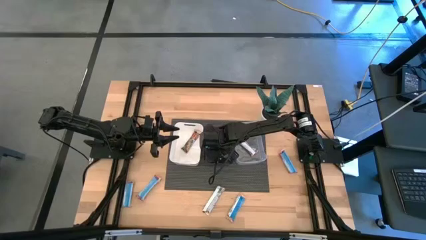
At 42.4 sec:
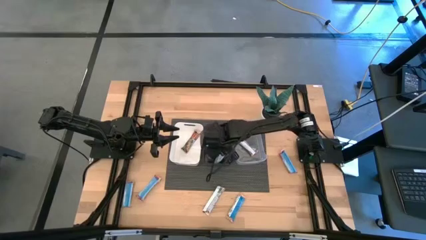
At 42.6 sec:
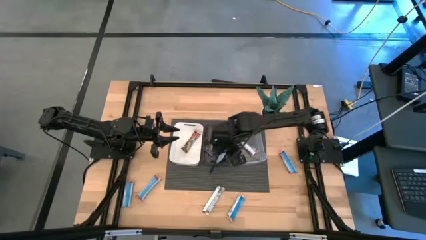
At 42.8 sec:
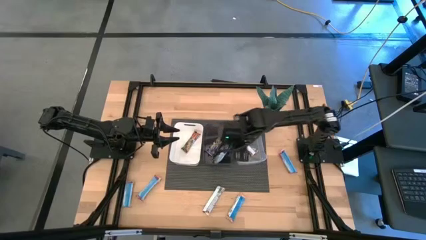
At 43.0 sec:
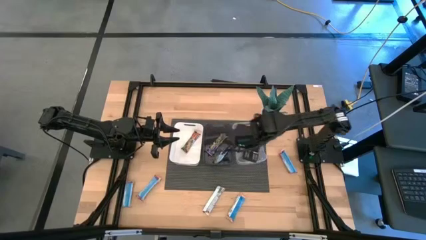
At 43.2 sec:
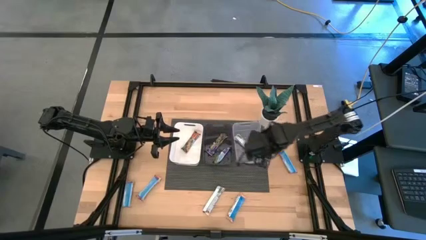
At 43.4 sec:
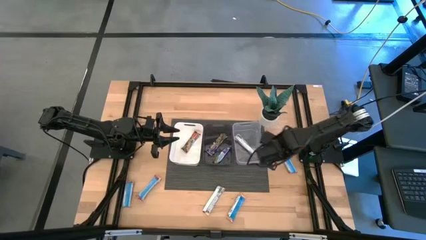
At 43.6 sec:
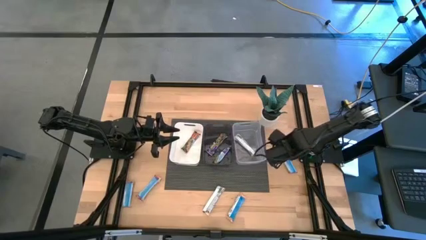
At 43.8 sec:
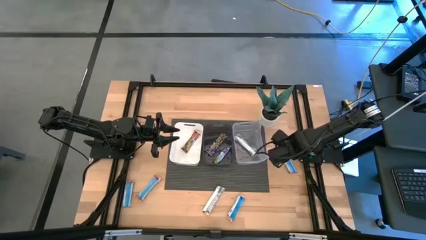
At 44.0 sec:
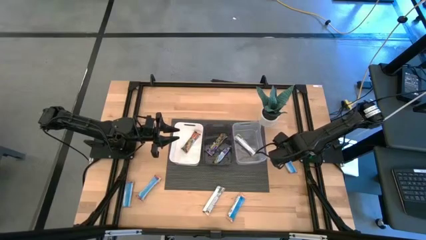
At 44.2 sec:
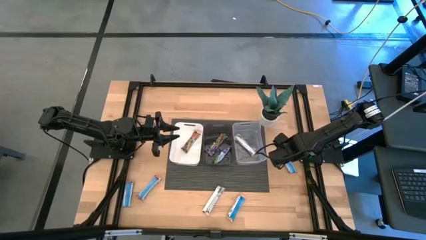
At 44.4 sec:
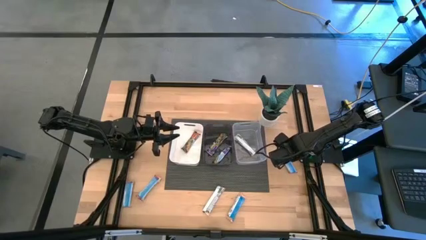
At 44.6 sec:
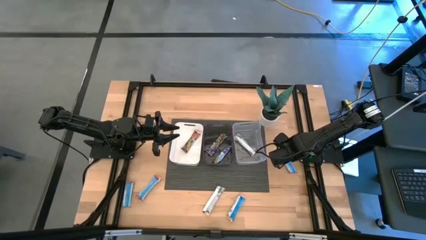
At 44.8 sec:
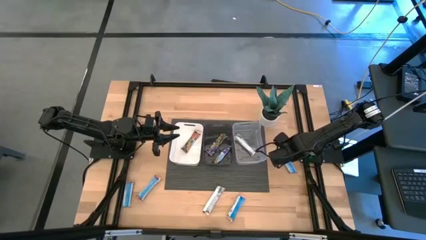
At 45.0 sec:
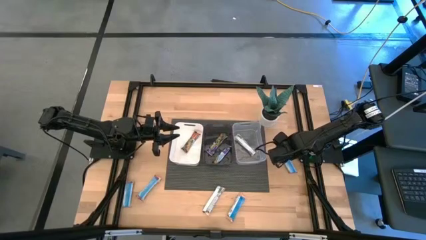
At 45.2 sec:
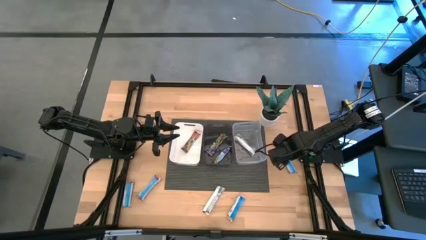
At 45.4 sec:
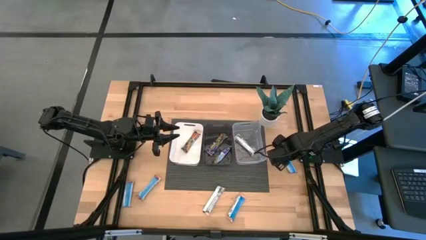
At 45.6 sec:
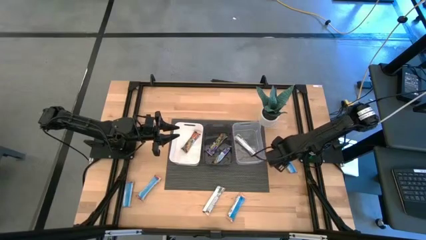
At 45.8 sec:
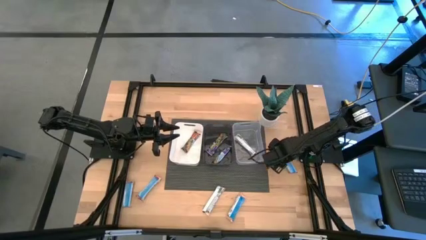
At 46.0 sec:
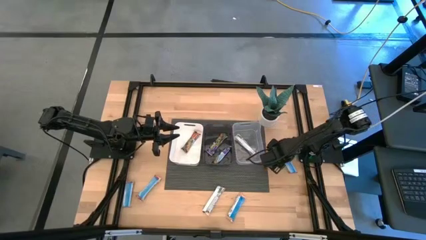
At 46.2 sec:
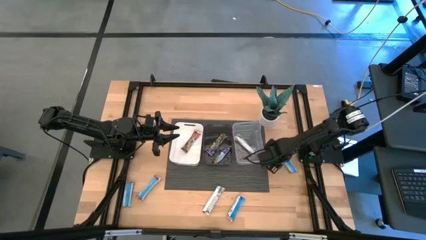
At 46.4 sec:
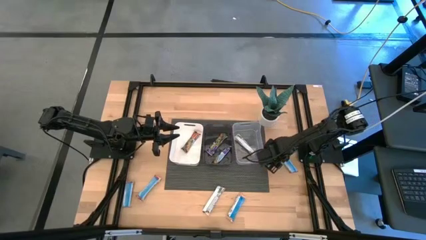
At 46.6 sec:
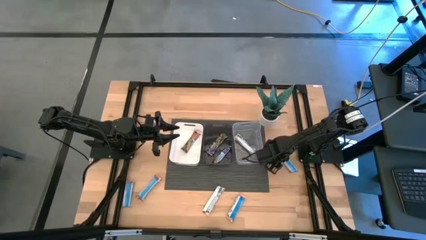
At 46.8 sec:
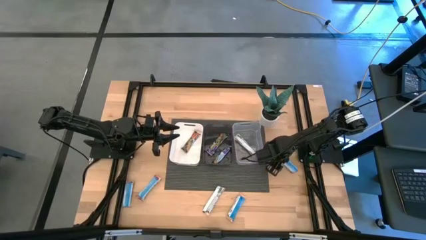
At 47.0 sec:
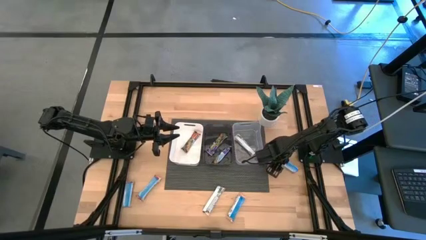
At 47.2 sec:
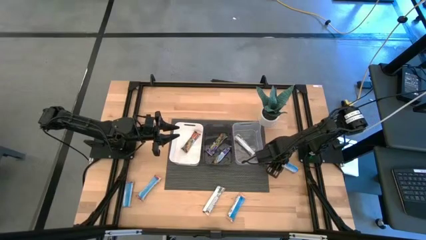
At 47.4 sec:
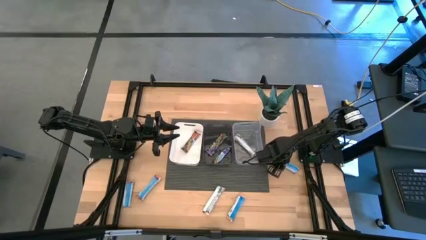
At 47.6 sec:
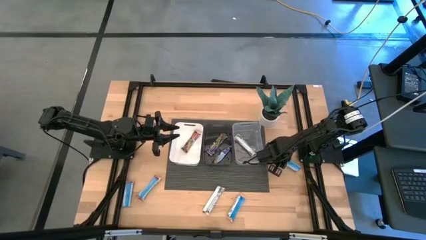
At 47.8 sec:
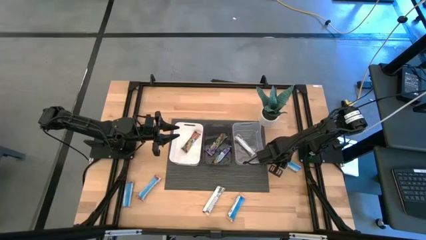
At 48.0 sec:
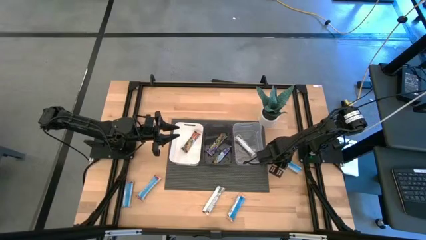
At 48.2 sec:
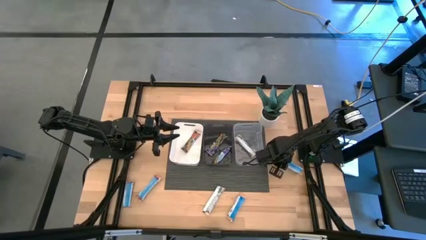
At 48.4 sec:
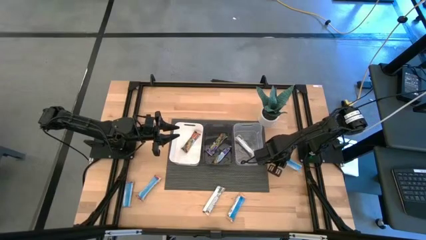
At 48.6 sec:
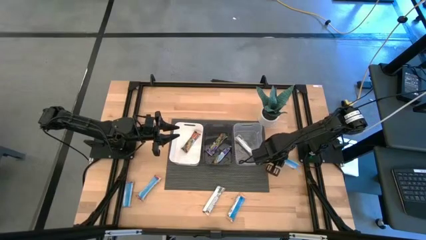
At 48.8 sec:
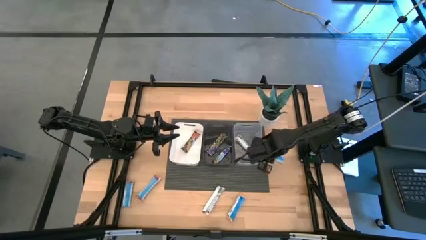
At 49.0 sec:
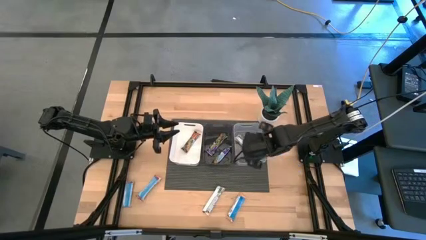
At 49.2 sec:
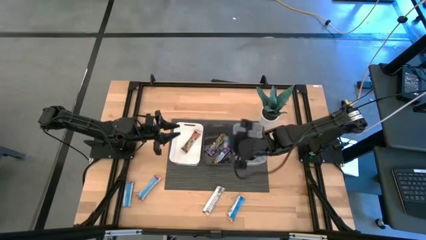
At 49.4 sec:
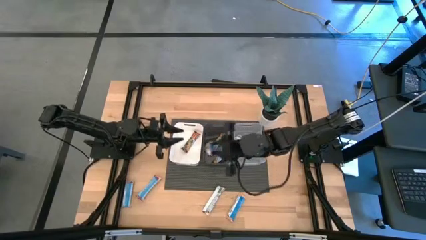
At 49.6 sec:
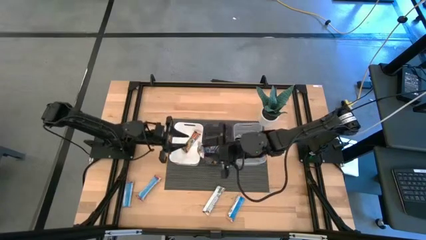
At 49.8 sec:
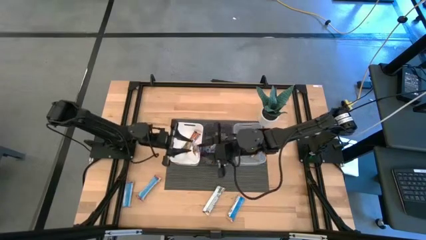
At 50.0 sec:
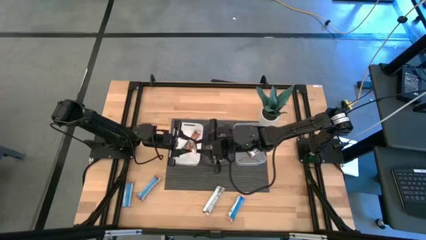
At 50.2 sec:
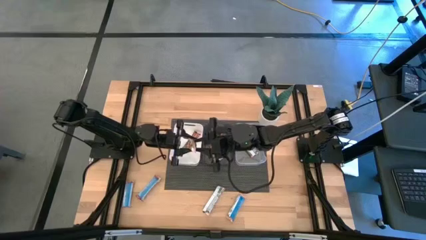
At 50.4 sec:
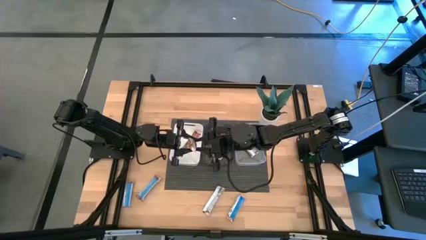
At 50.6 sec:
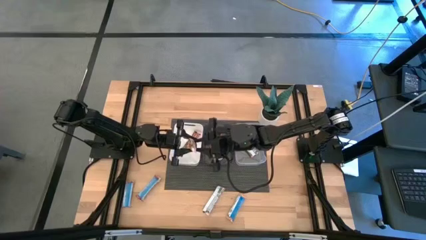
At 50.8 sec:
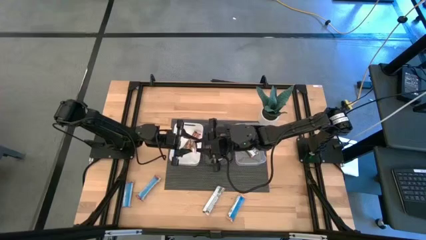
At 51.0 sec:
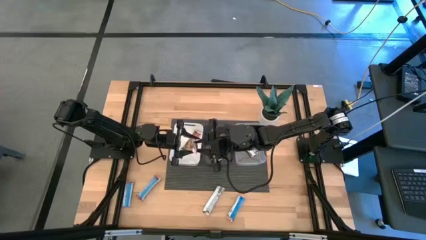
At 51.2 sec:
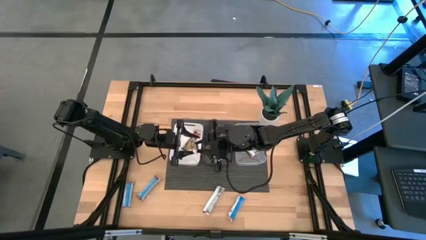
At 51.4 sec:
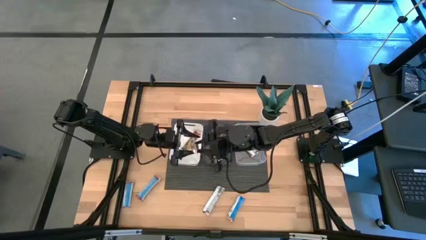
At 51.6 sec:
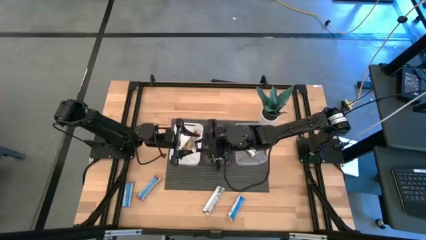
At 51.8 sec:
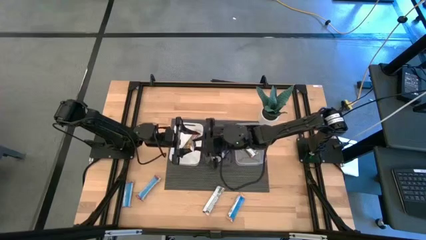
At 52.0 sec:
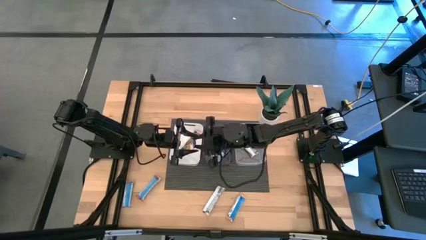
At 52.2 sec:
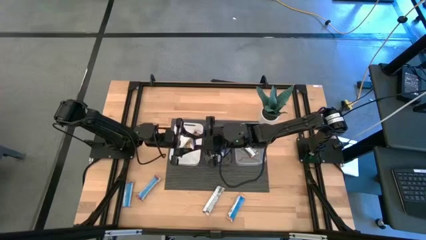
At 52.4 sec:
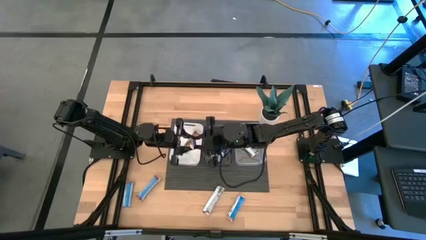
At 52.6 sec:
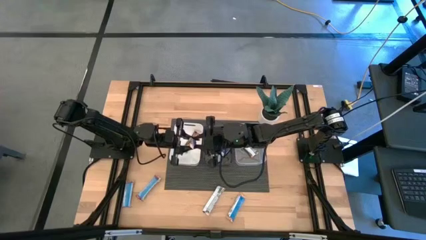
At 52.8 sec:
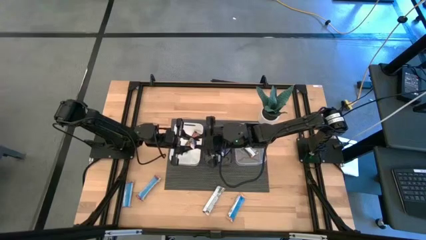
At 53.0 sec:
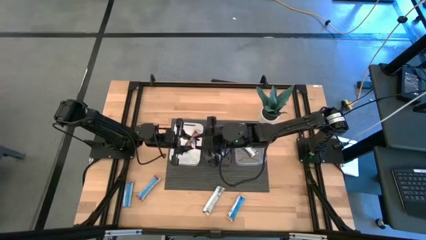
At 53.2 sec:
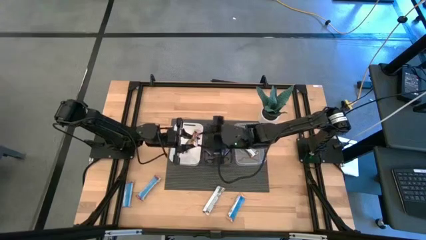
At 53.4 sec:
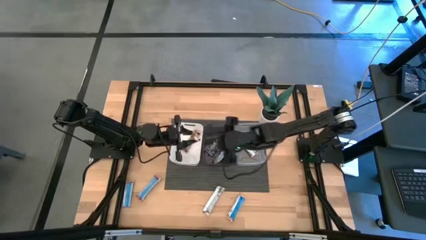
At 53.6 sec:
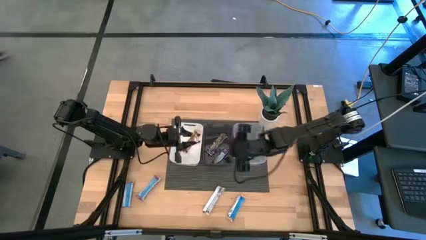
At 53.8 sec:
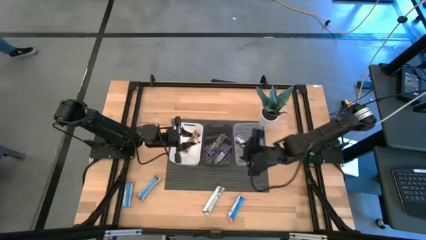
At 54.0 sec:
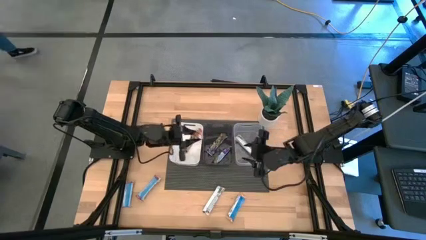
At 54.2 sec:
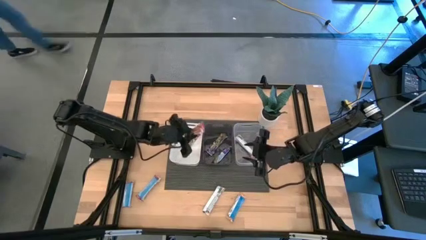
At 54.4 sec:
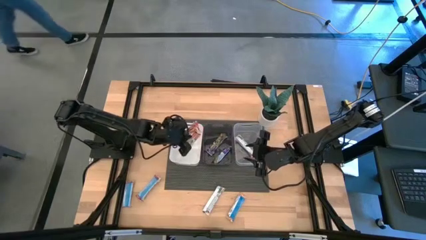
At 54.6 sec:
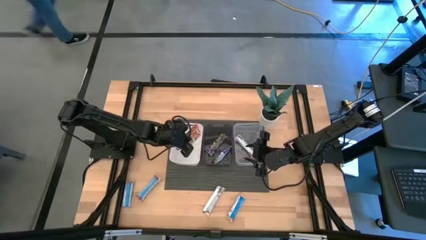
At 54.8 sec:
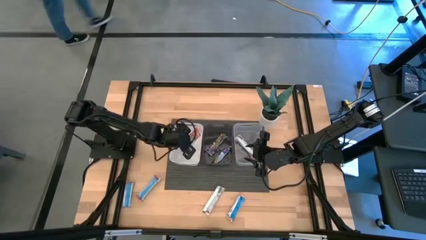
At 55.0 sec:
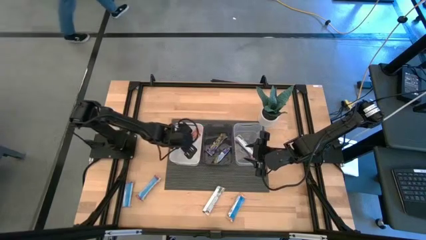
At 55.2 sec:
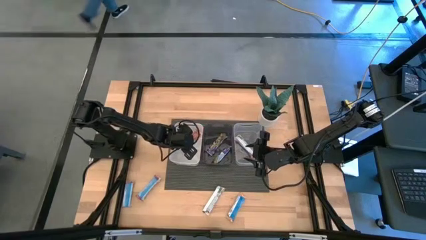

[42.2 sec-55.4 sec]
Task: Pick and place Granola Bars by type
Put the red granola bar into the white bin

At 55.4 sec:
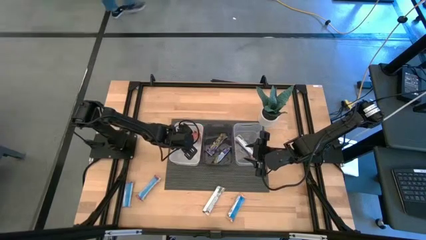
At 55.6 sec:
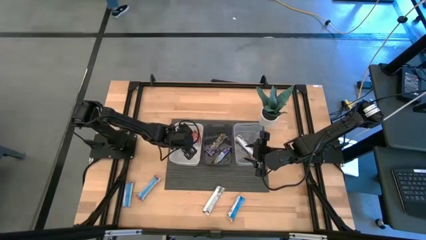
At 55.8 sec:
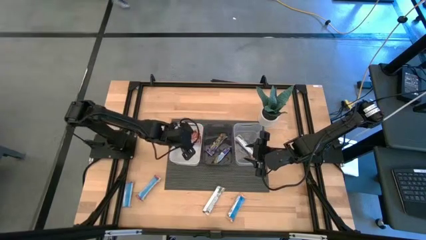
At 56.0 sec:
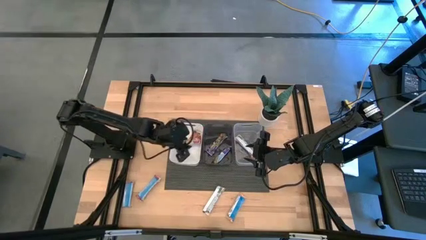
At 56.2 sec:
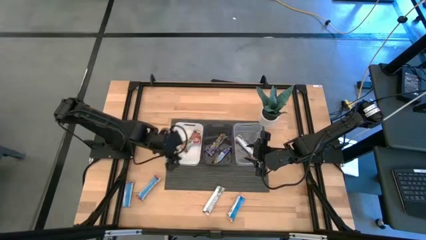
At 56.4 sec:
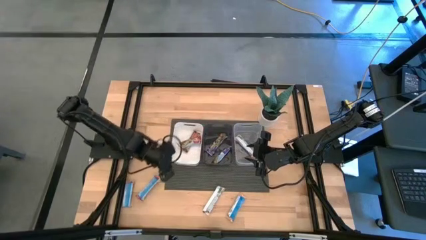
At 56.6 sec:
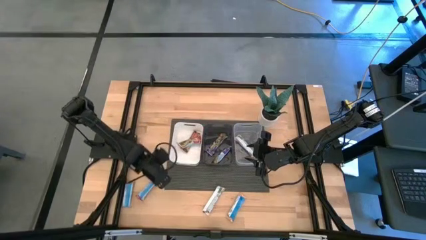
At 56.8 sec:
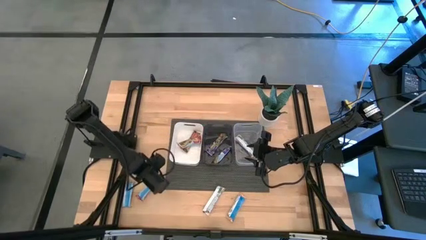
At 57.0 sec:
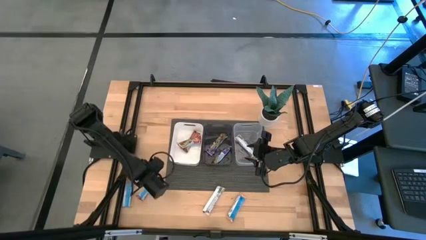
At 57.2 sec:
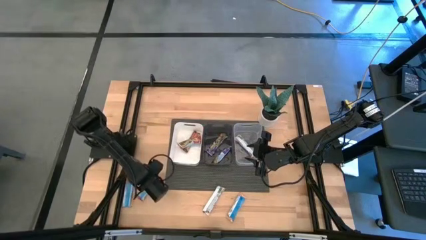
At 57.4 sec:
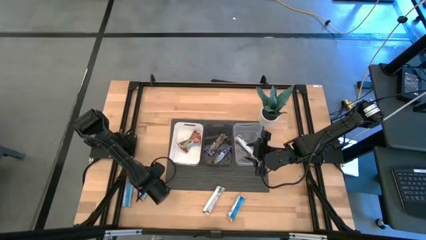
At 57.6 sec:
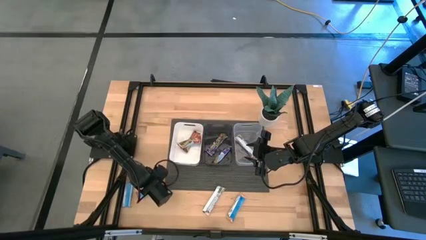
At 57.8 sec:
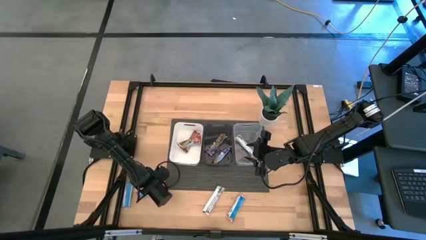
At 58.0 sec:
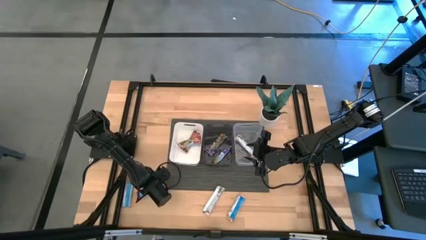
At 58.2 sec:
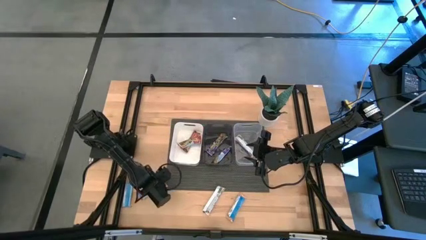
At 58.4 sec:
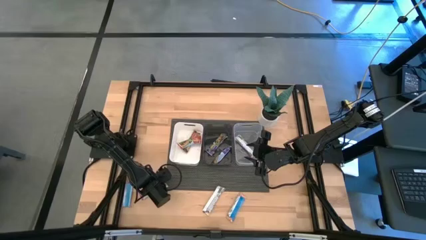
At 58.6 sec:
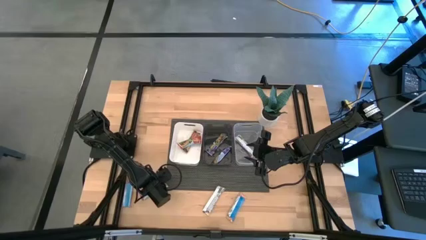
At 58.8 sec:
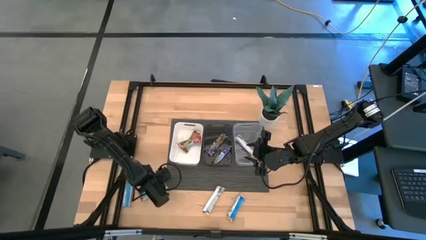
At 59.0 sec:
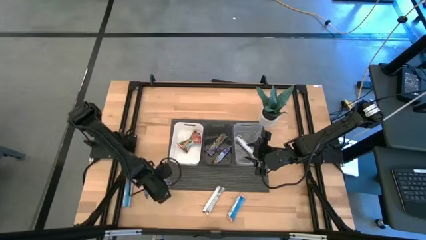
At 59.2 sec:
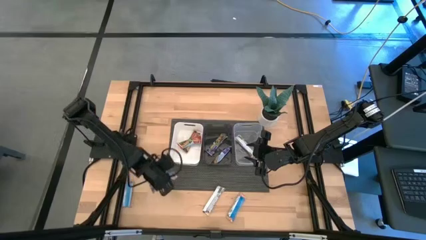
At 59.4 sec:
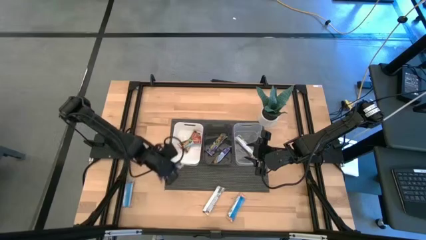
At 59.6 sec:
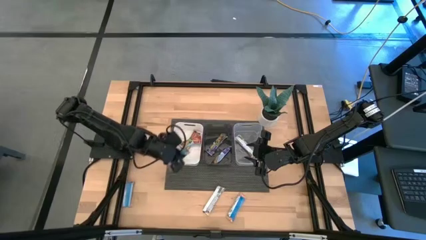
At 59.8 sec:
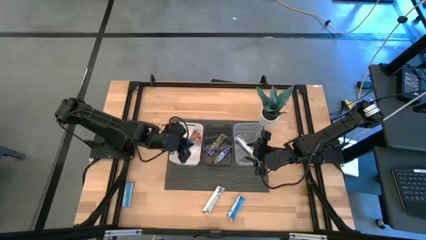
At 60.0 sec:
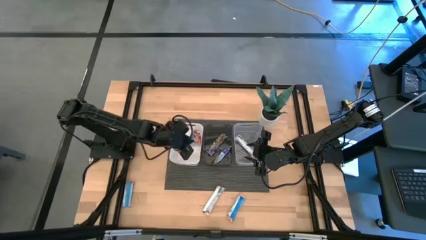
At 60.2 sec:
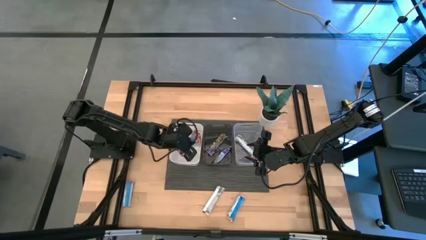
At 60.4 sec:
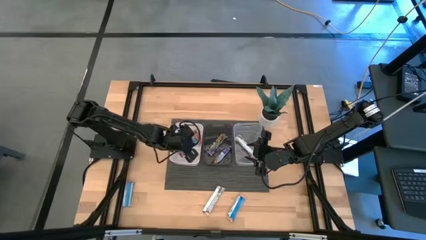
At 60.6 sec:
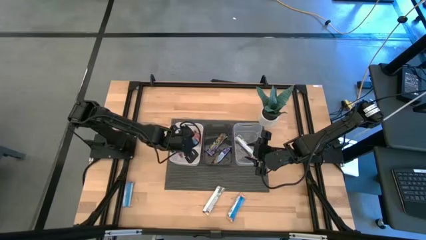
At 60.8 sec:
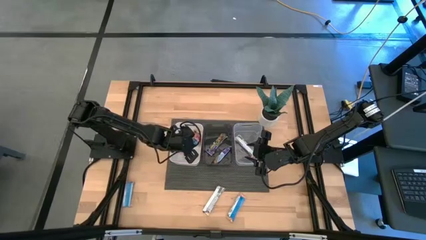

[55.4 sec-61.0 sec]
Put the red granola bar into the white bin
